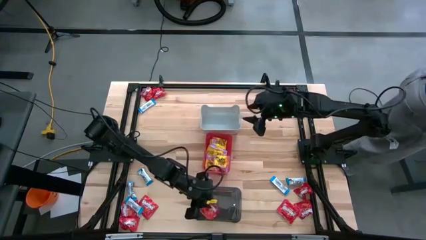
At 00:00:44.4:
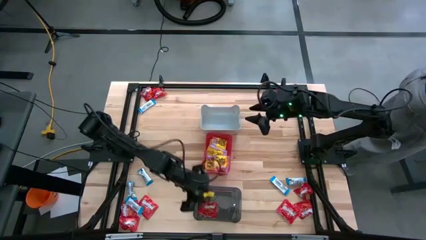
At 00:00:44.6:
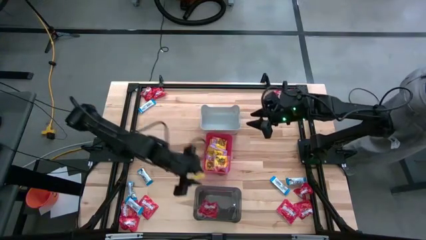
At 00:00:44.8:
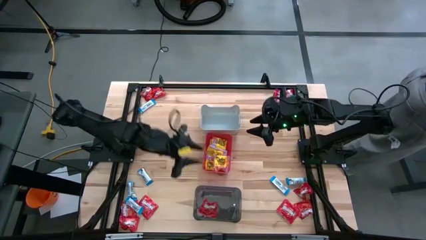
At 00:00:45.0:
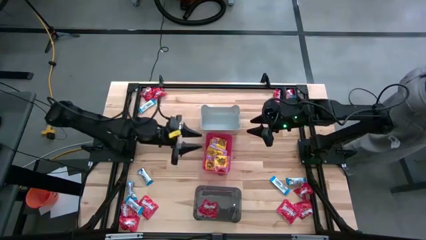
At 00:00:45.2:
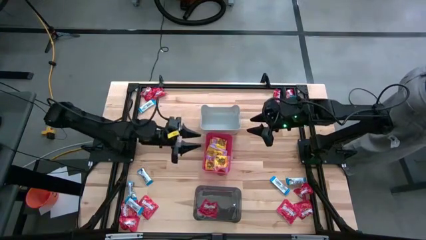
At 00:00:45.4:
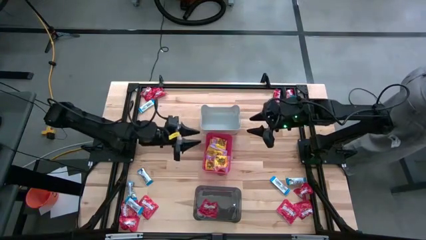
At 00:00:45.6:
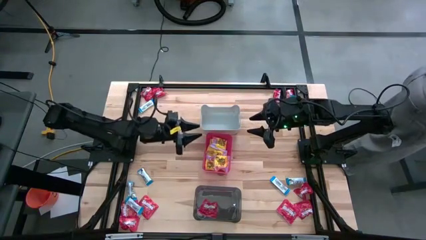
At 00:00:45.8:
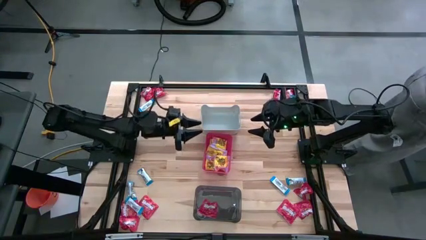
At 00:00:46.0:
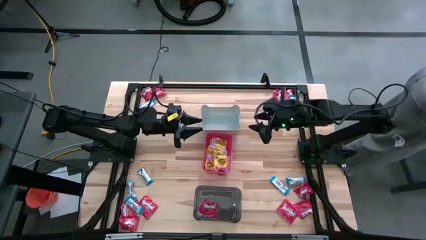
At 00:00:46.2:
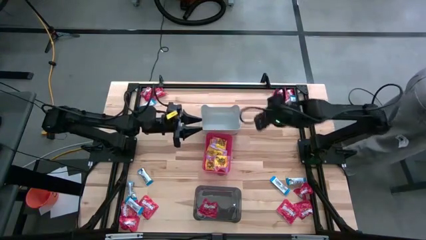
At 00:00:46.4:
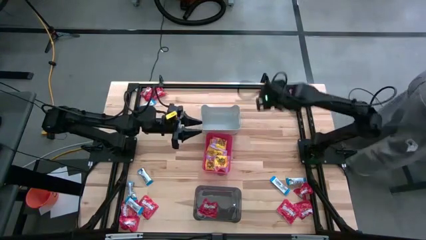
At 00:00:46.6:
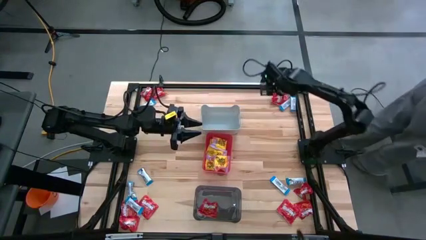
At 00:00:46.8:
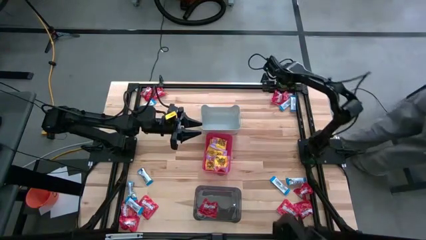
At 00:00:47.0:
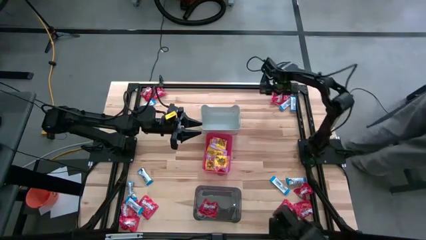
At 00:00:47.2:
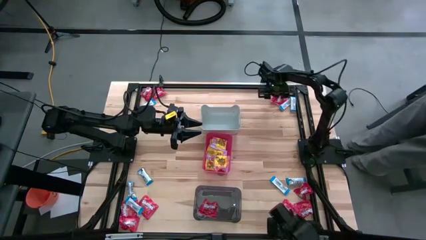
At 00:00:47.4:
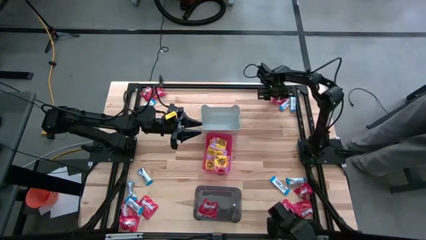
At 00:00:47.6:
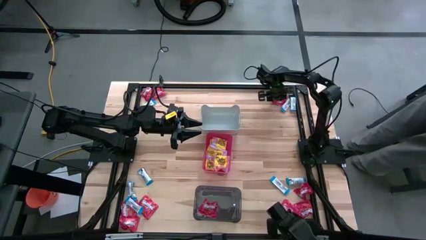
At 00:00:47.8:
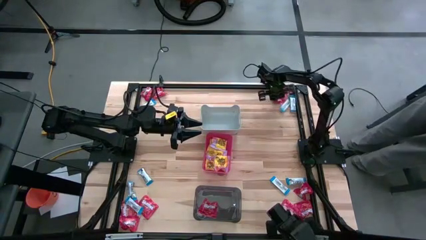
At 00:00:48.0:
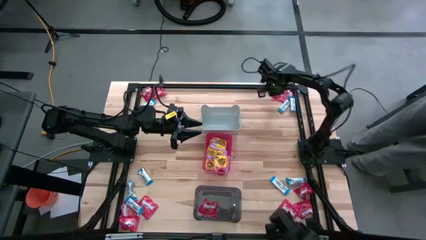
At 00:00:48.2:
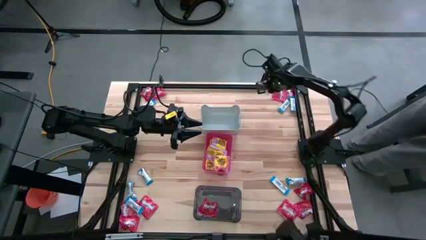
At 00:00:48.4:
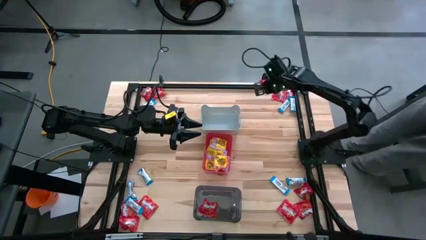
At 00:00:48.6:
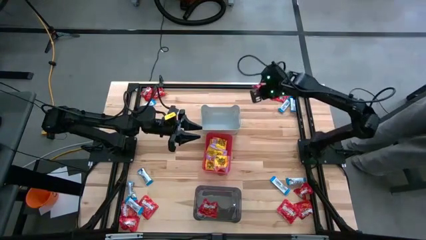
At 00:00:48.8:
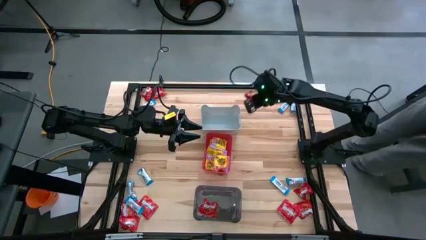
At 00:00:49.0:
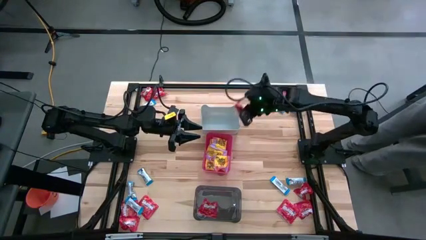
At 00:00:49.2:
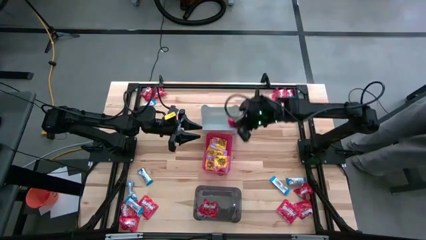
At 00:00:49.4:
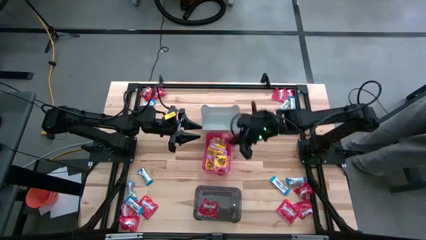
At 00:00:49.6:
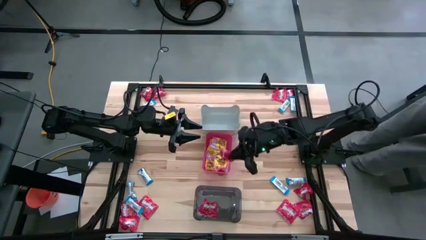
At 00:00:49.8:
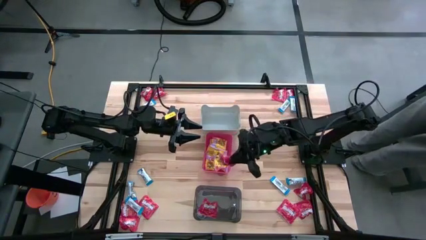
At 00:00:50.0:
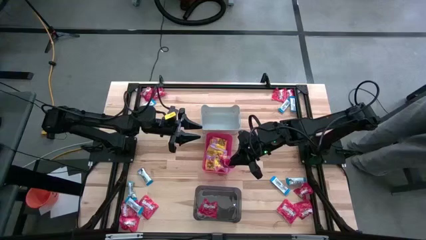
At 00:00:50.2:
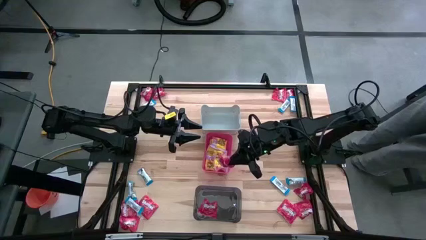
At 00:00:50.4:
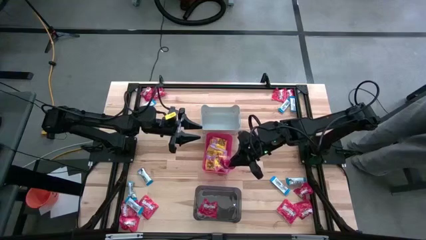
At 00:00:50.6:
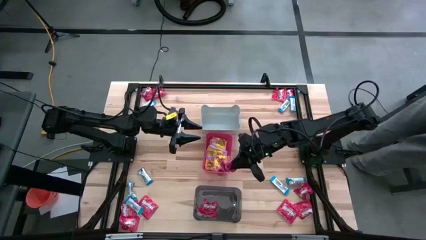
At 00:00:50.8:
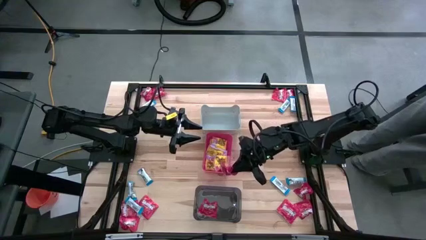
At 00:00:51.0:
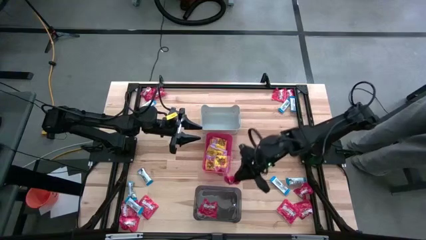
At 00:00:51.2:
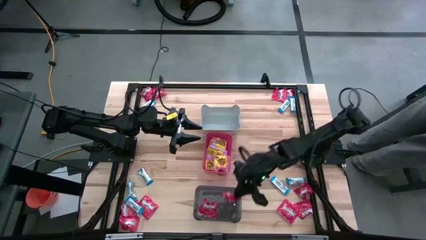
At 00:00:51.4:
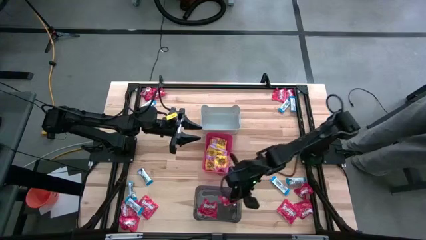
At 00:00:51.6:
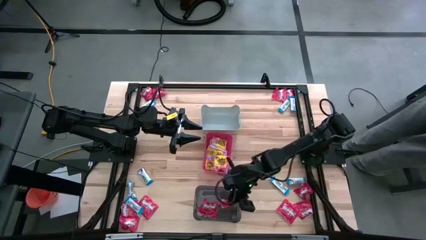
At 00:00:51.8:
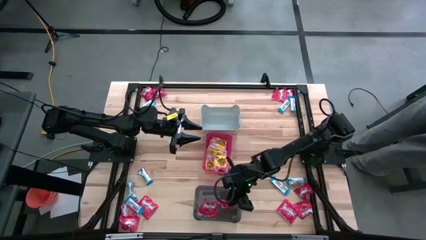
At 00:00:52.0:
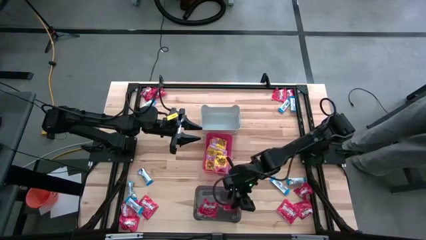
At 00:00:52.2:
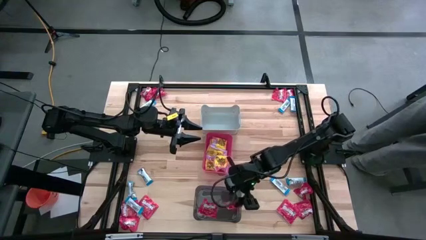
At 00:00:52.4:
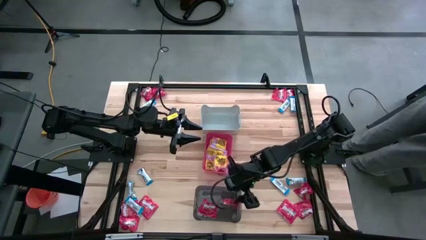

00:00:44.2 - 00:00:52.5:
Task: Sort candy
Put the red candy into the black bin

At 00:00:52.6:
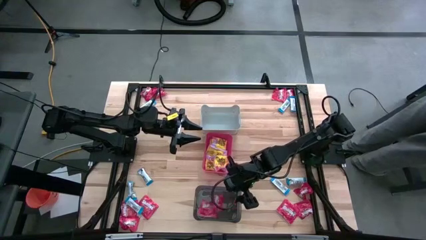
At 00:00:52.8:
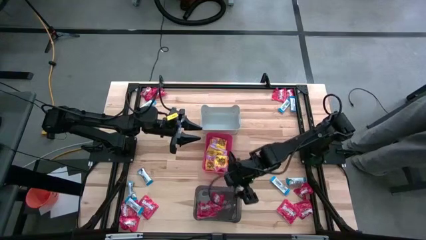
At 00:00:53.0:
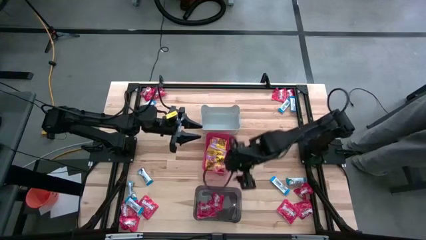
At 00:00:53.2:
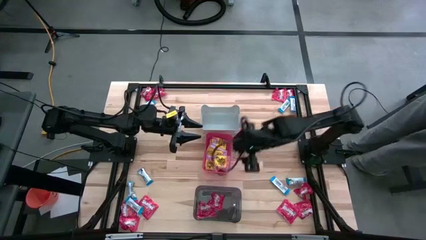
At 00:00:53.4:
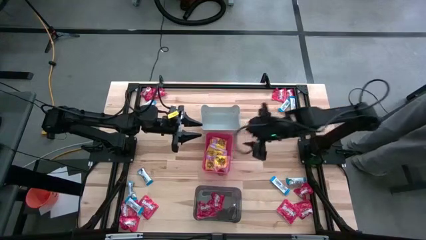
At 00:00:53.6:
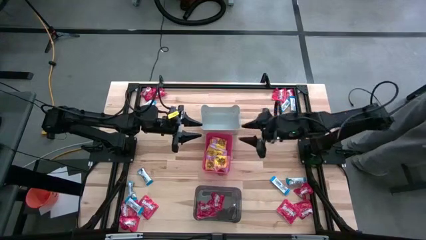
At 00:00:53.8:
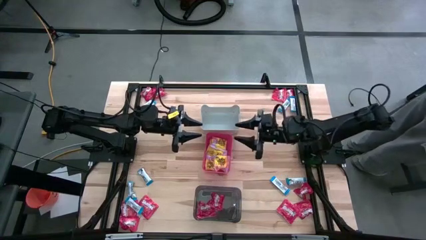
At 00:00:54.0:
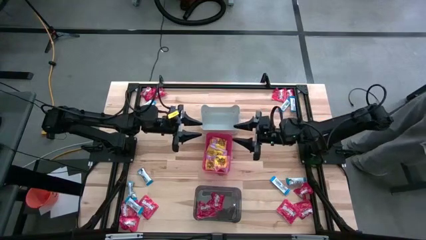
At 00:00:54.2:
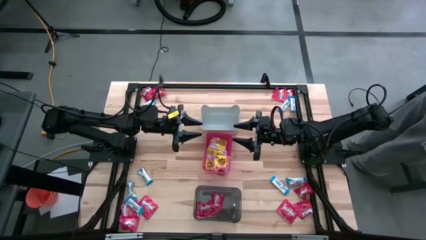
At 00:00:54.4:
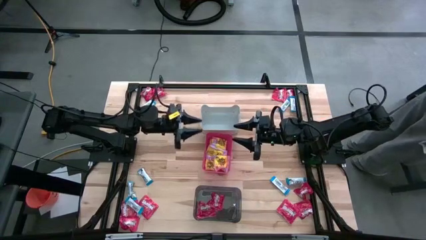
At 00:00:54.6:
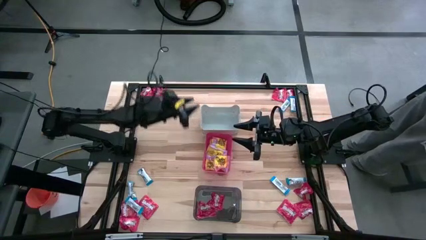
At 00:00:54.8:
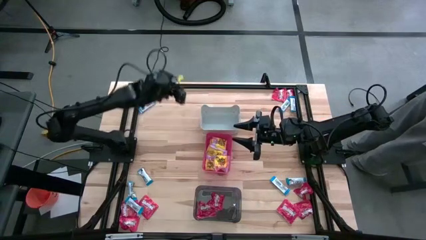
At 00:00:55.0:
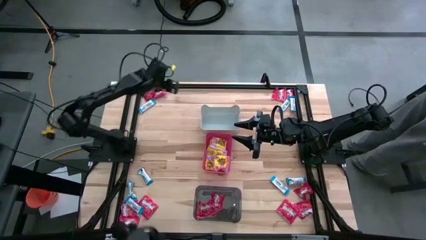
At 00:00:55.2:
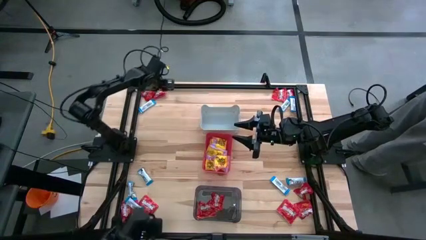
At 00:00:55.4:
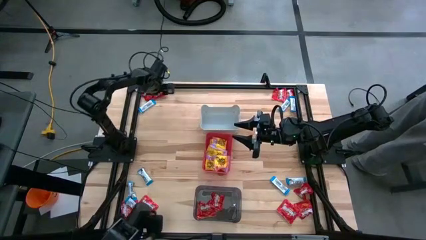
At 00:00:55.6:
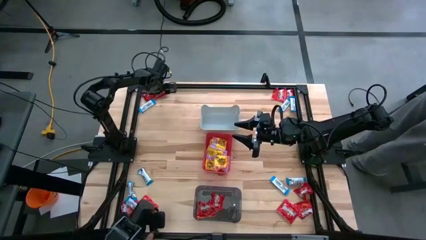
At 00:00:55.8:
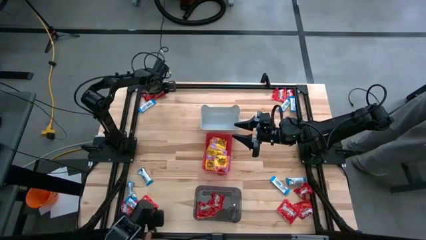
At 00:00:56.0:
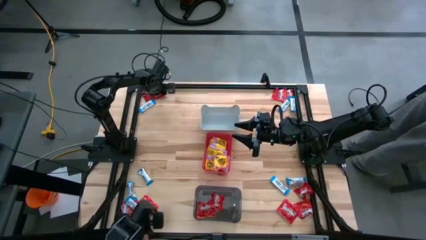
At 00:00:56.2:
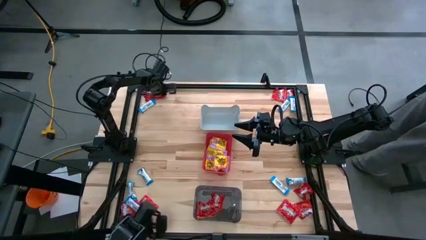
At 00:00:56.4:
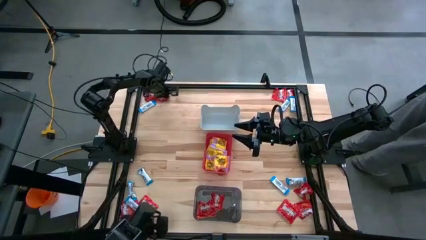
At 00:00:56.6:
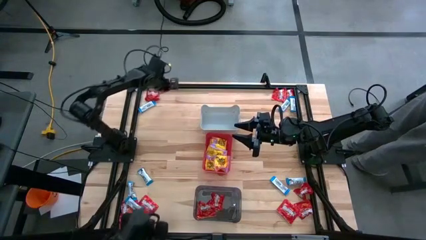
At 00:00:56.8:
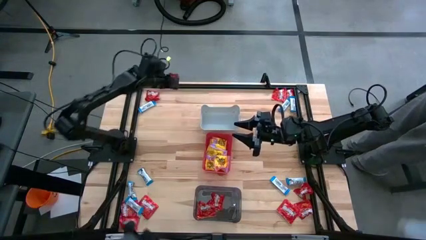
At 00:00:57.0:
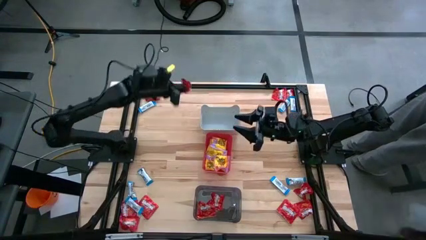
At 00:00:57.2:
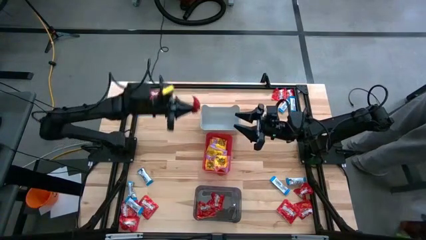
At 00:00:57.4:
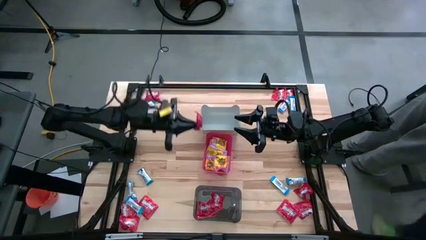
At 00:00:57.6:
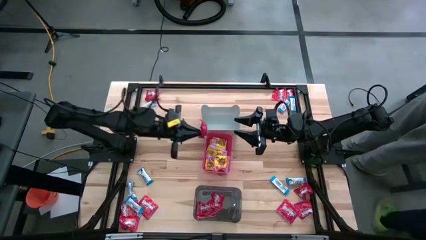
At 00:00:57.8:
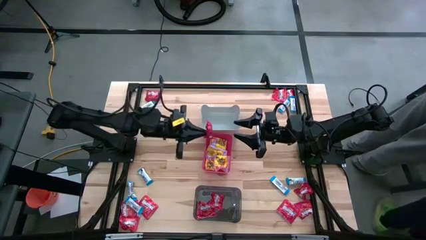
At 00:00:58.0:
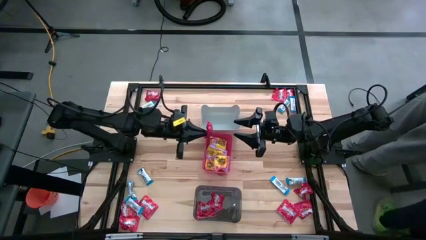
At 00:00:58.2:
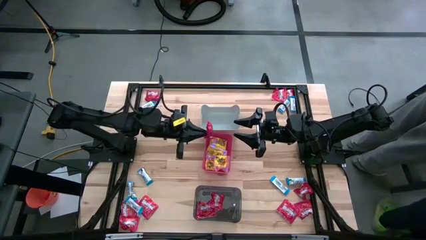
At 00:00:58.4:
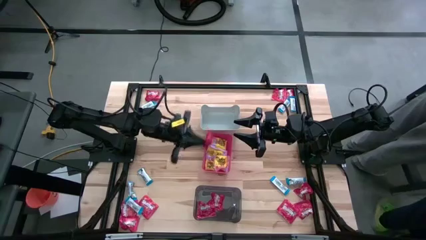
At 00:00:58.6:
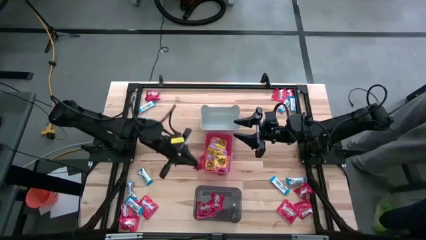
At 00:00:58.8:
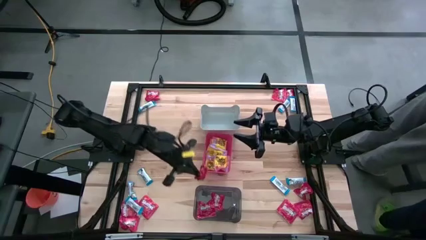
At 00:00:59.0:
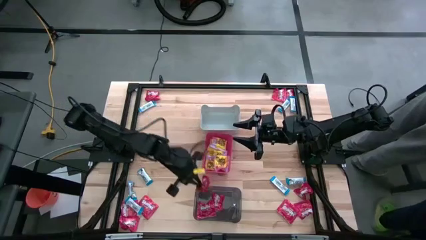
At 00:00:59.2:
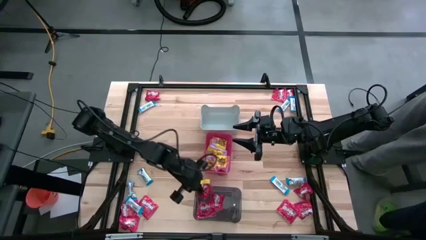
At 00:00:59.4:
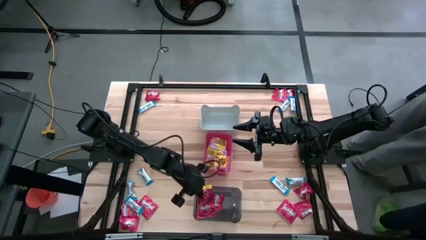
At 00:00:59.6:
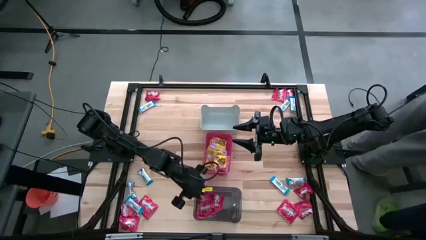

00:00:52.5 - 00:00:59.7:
Put the red candy into the black bin
